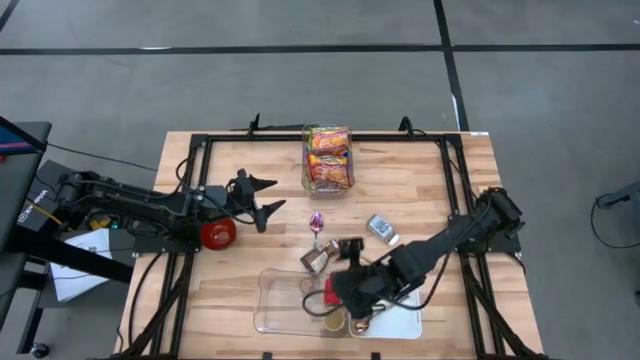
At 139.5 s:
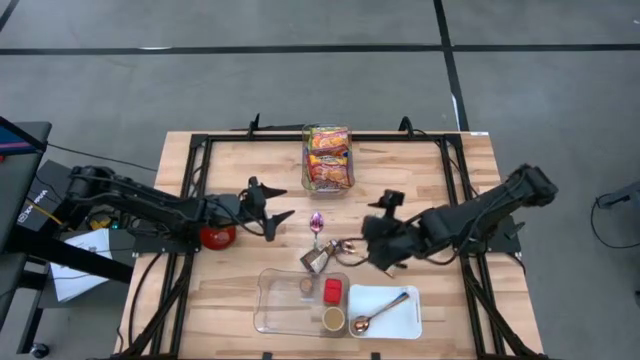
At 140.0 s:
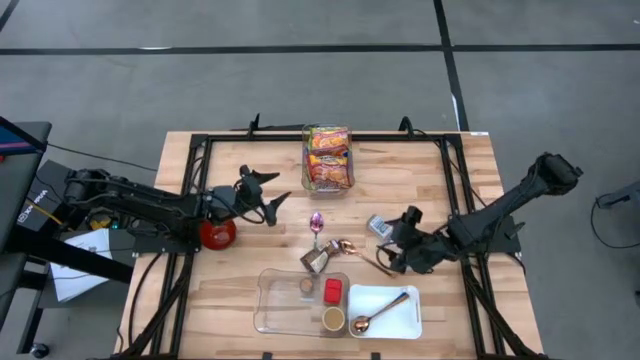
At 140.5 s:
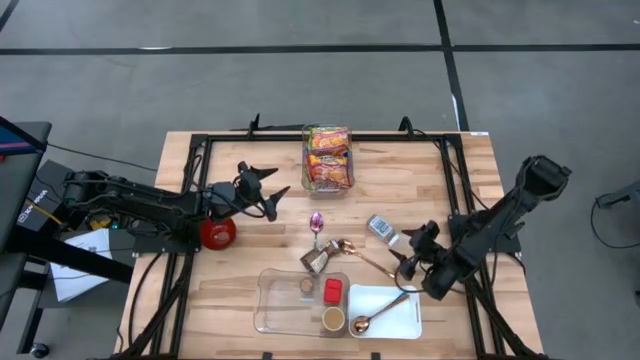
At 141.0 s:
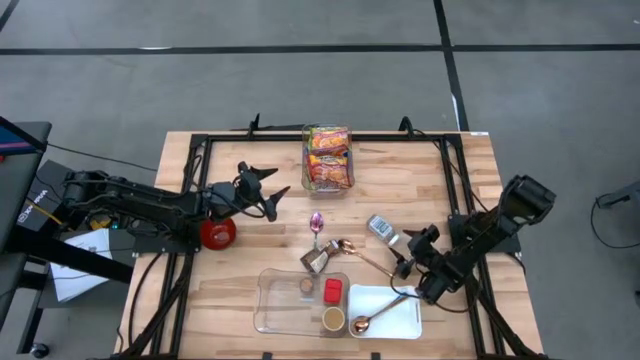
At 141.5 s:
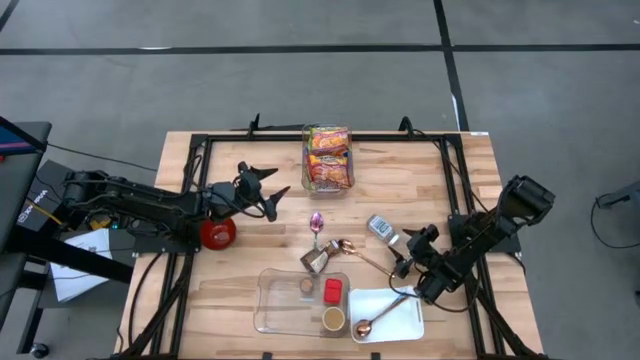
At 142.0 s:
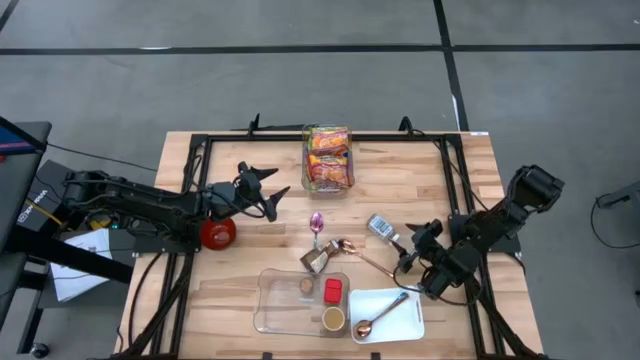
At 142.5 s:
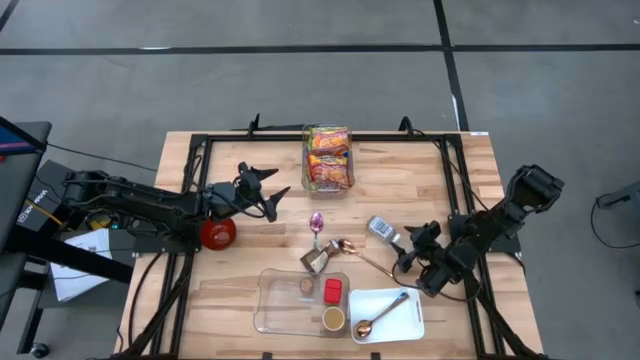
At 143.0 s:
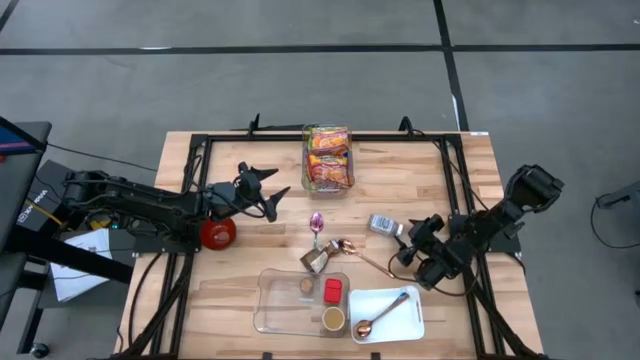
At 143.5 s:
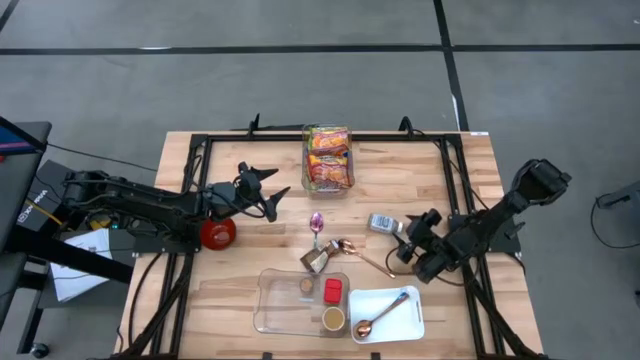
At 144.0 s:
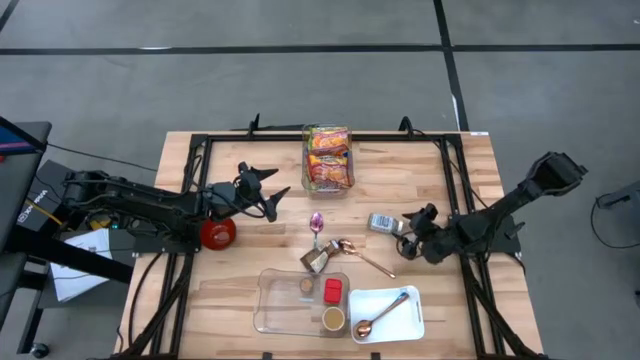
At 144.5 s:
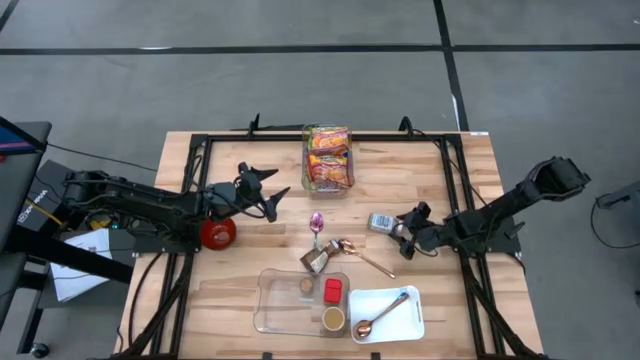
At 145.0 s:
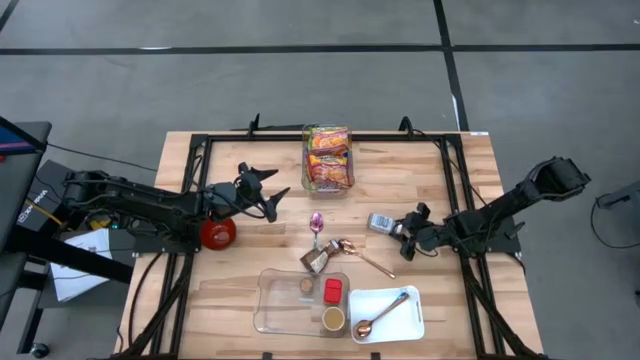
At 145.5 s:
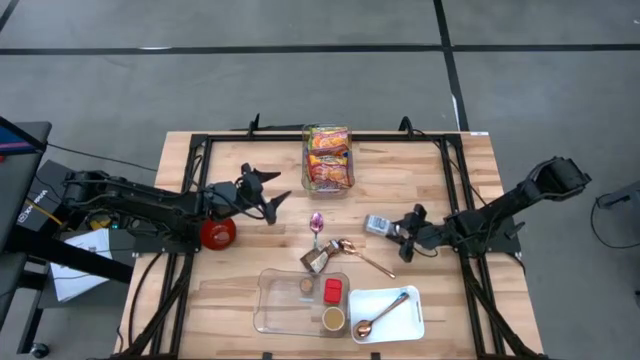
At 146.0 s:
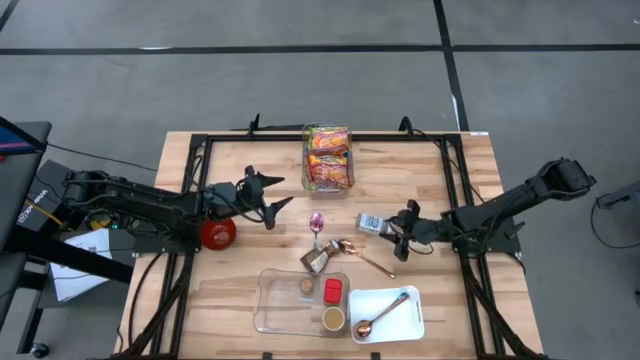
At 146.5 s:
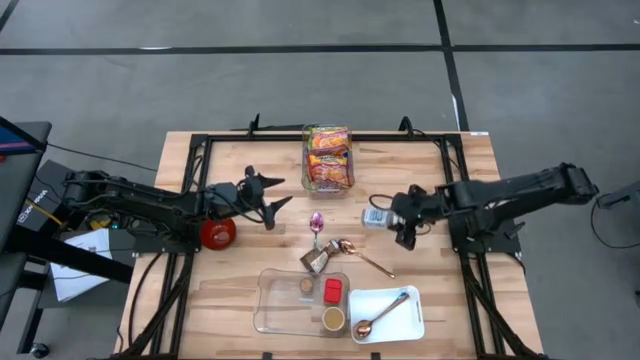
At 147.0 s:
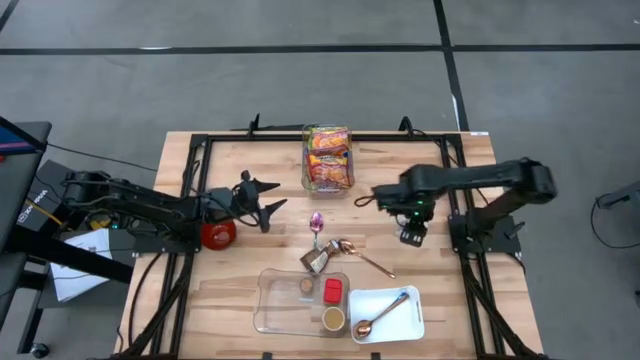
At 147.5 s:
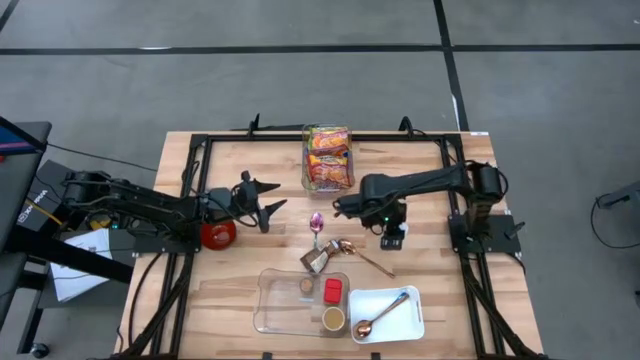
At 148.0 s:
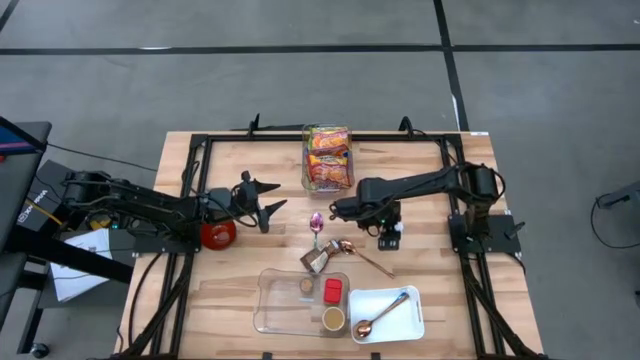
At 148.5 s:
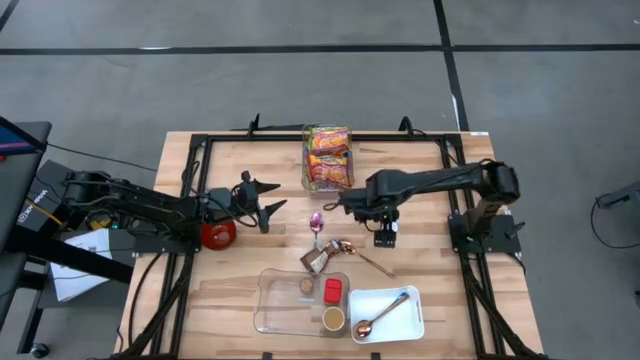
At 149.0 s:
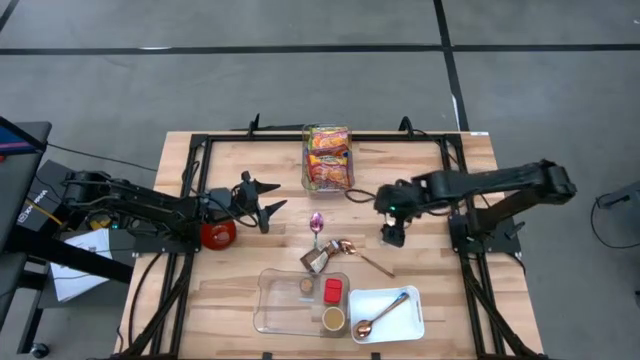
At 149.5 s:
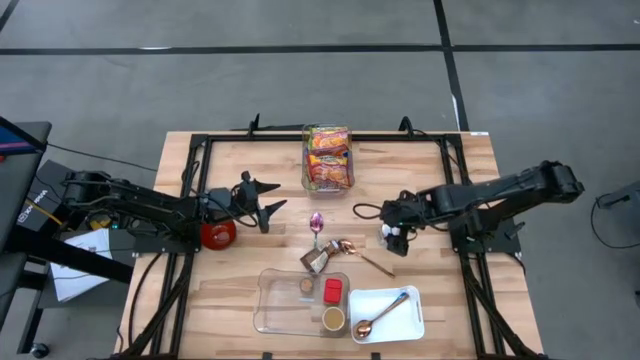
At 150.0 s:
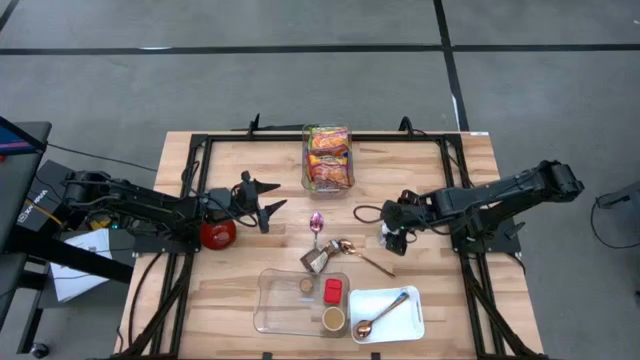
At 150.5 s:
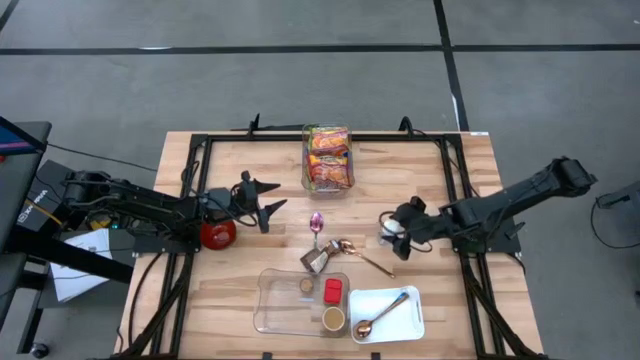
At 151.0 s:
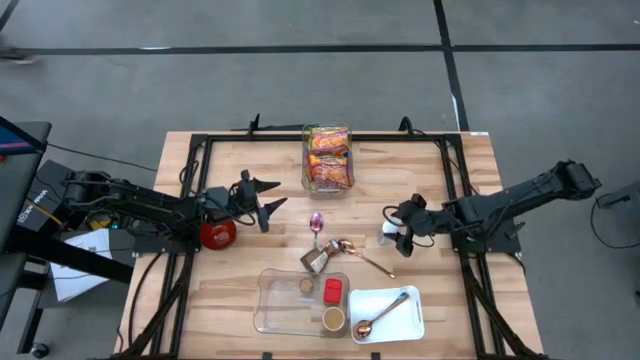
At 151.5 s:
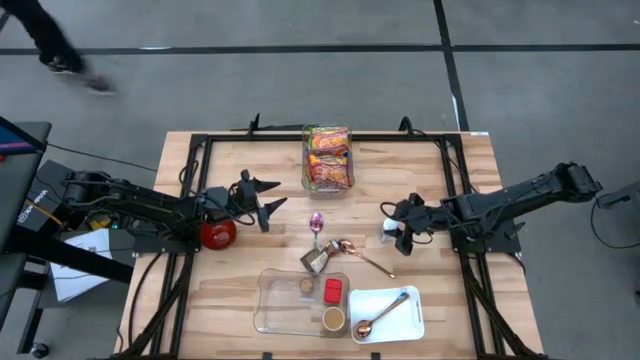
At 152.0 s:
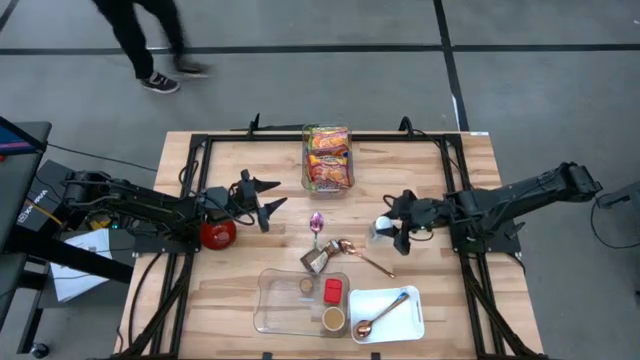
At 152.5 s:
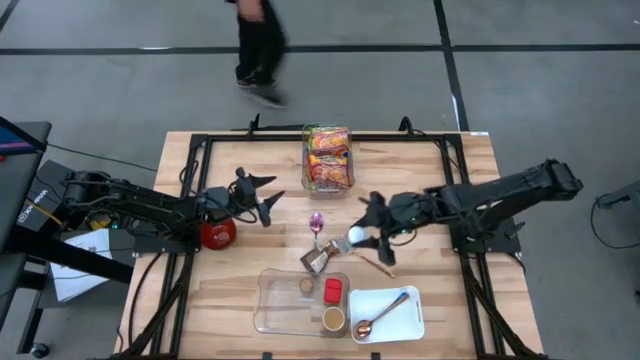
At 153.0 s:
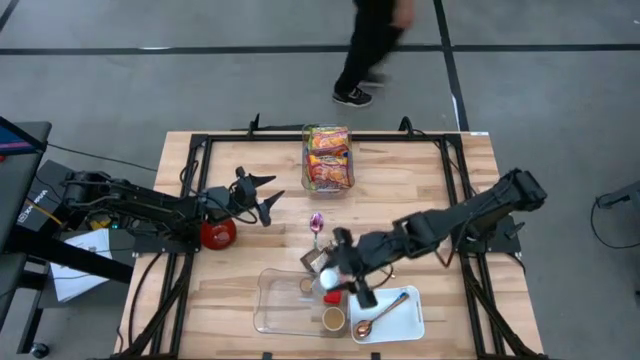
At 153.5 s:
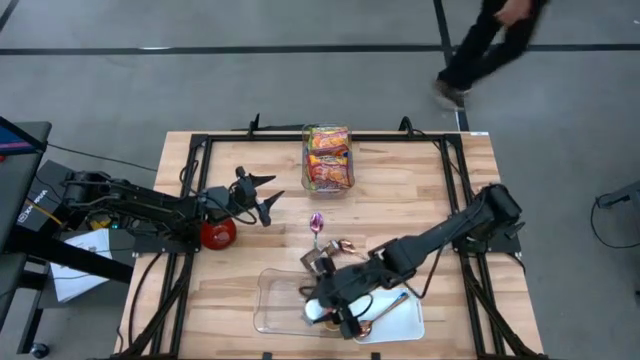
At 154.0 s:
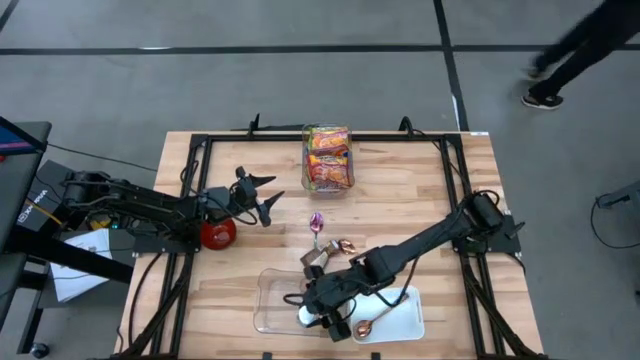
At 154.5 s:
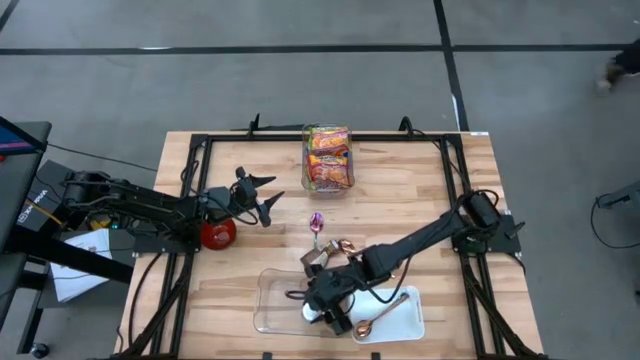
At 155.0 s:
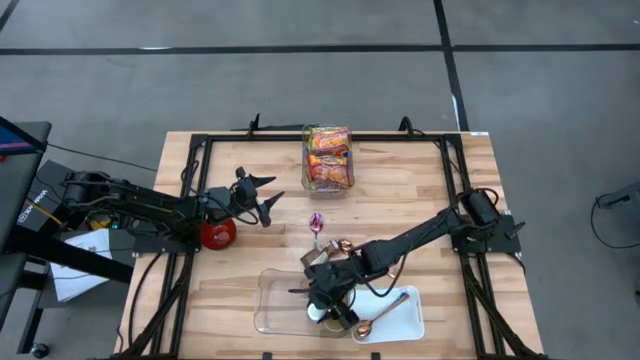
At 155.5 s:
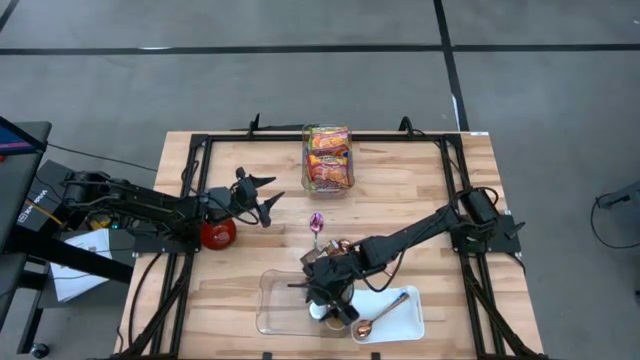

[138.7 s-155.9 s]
Task: Pick & Place Food Item
Put the white seasoning bottle into the bottom transparent bin

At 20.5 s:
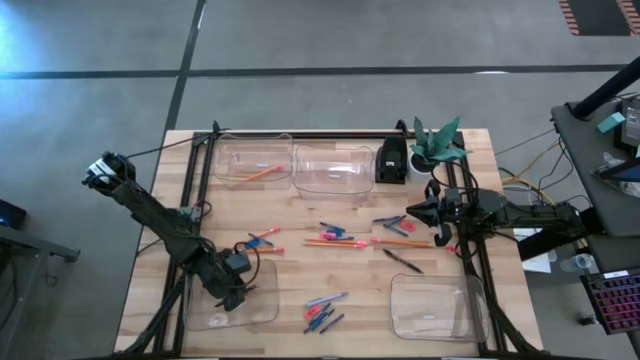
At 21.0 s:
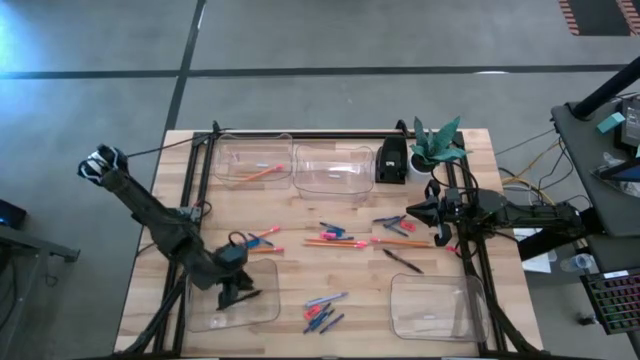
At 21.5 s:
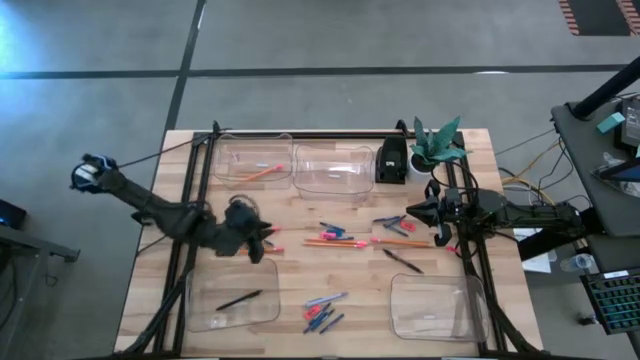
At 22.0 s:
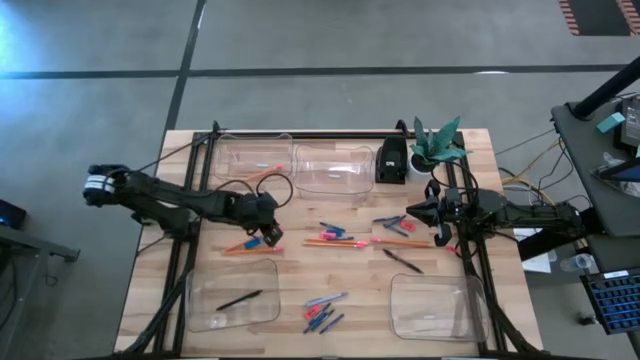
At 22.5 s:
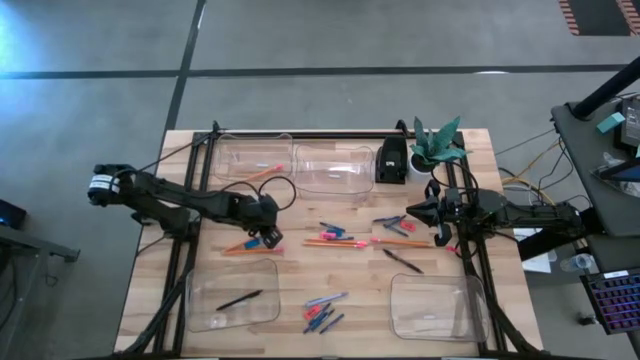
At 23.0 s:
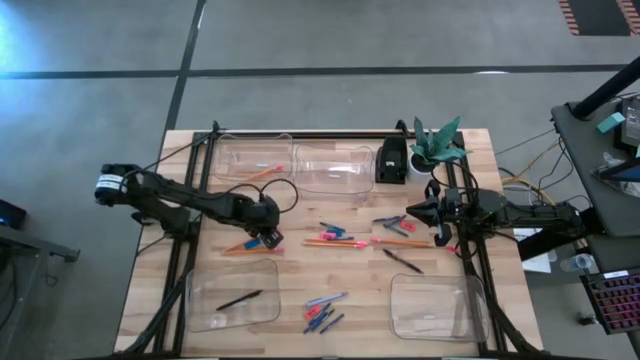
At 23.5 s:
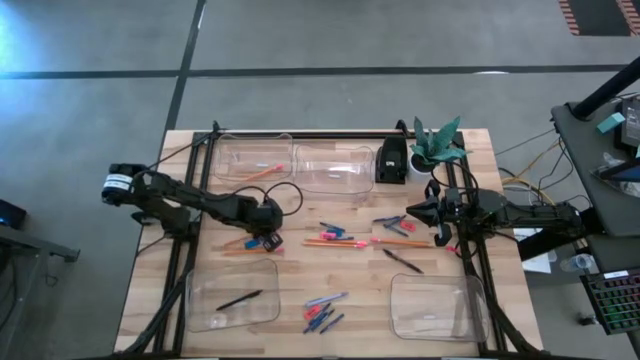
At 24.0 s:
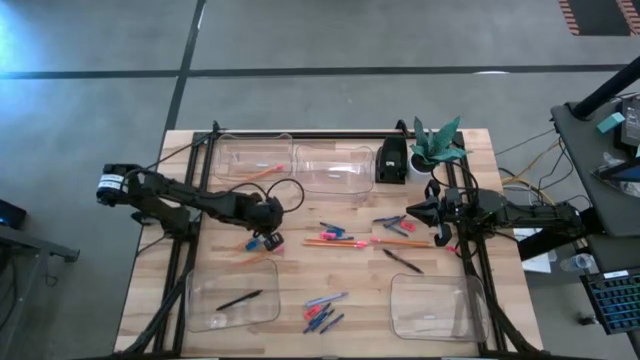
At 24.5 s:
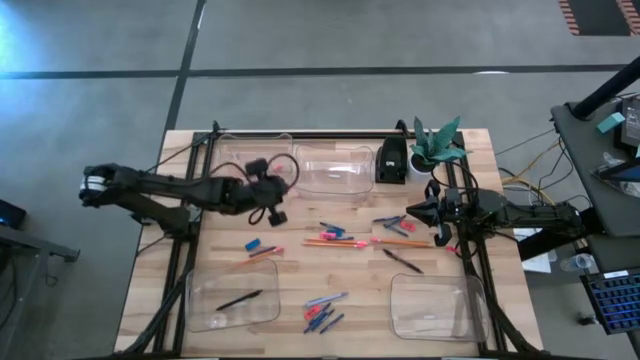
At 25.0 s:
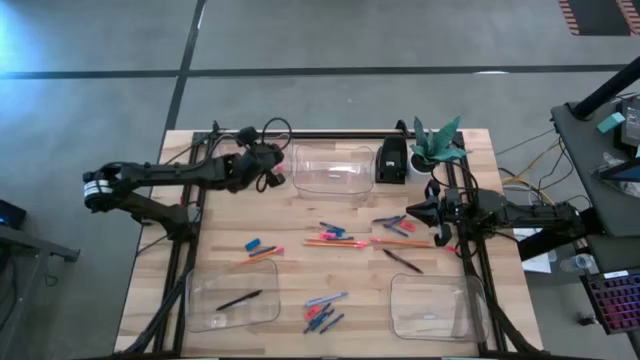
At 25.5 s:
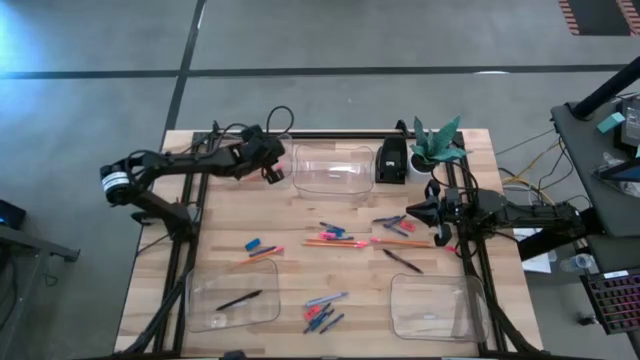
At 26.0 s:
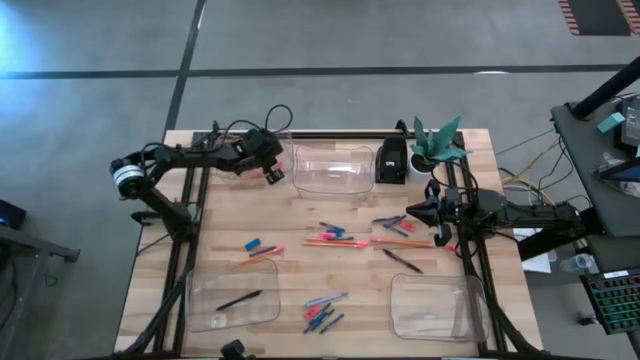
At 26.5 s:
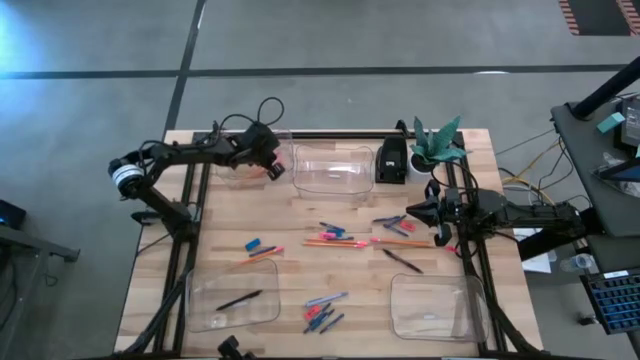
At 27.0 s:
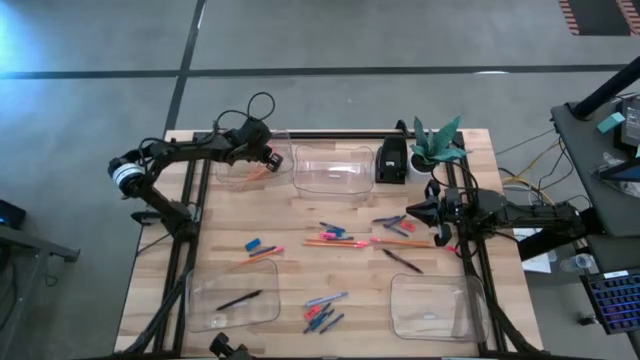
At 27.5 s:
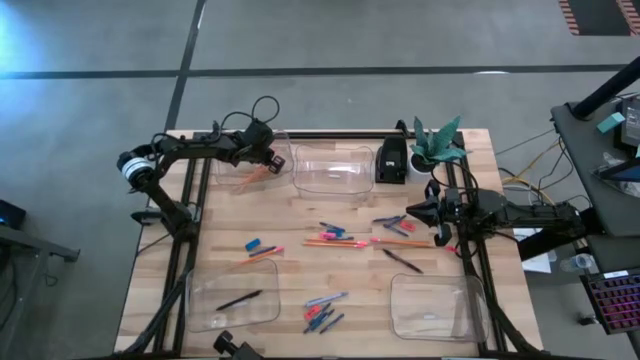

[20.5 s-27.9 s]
Task: Sort crayons/erasers/pens/pencils in bins
Put the orange pencil into the top left transparent bin
